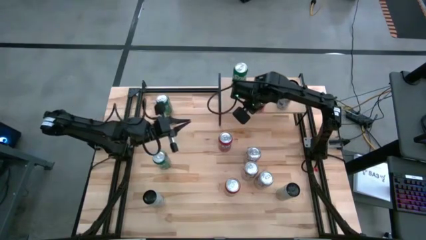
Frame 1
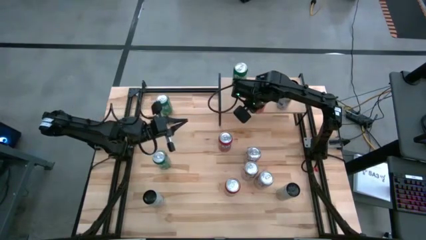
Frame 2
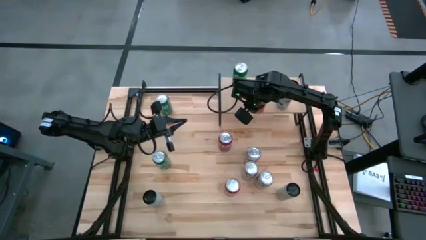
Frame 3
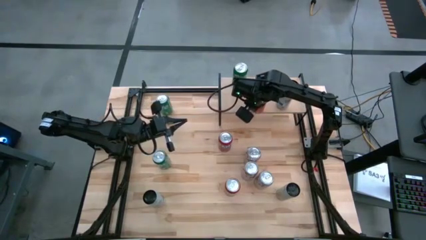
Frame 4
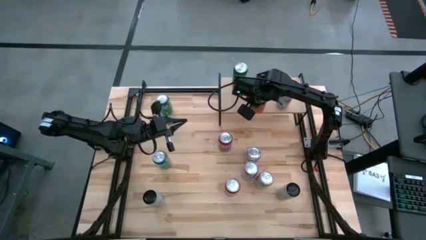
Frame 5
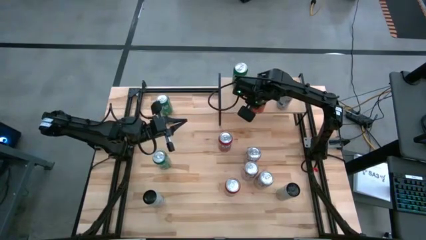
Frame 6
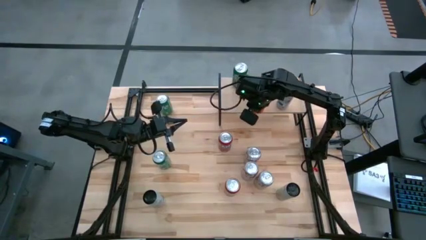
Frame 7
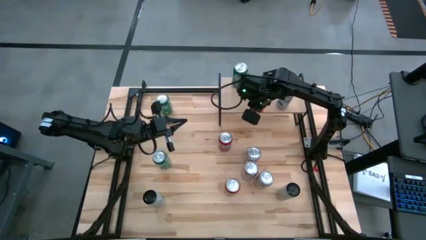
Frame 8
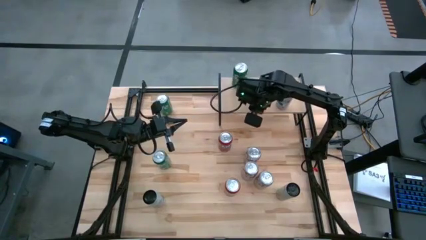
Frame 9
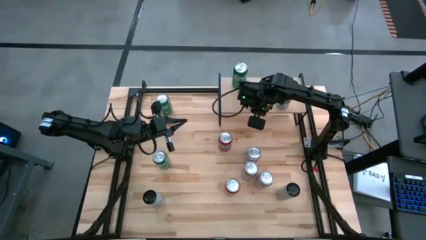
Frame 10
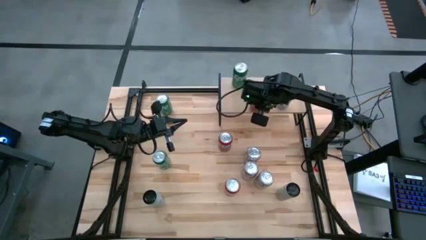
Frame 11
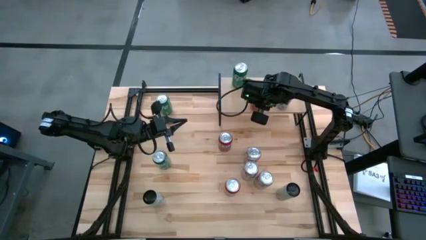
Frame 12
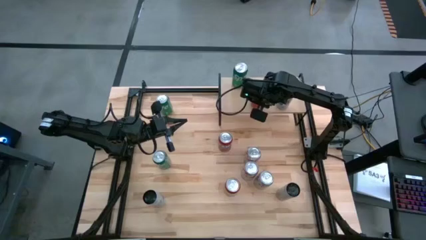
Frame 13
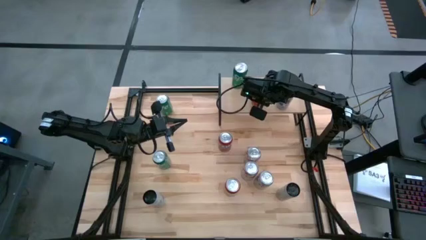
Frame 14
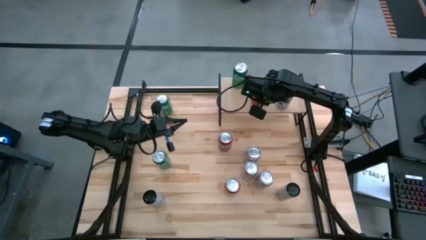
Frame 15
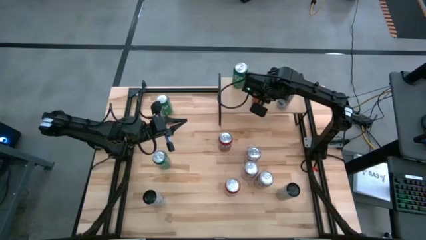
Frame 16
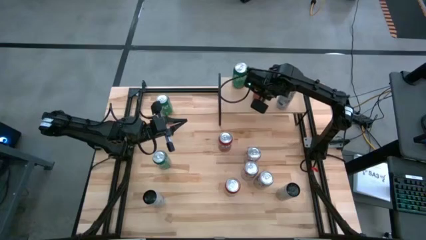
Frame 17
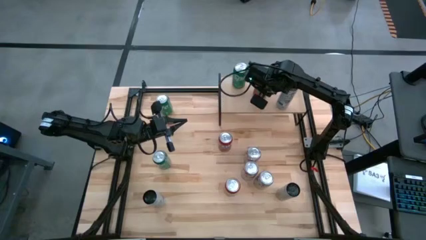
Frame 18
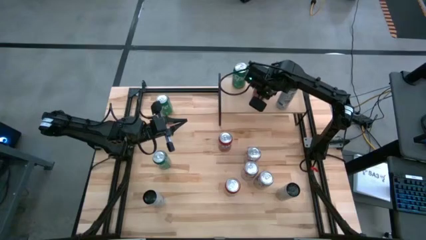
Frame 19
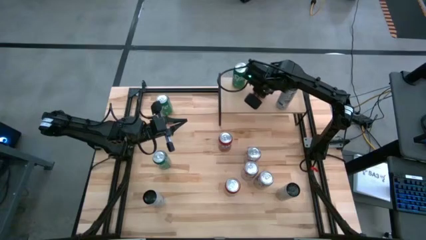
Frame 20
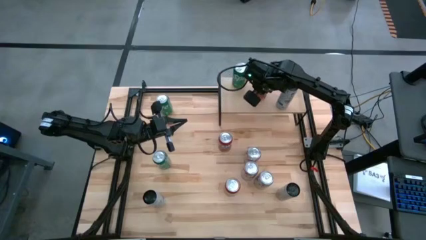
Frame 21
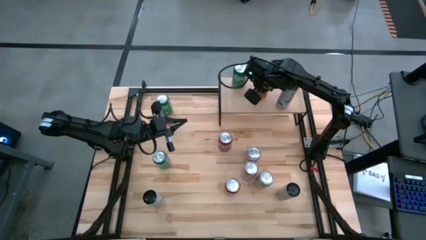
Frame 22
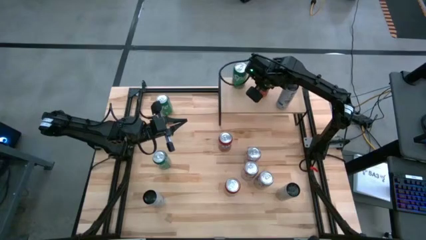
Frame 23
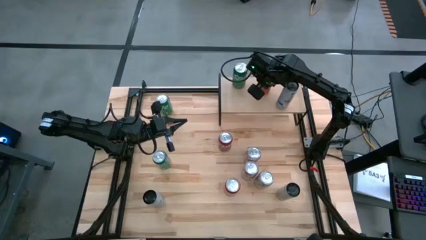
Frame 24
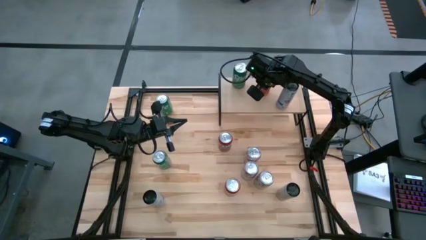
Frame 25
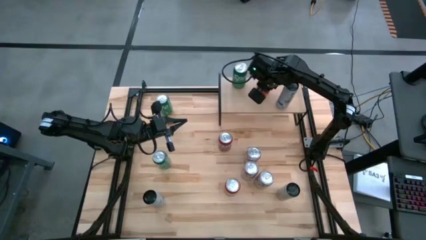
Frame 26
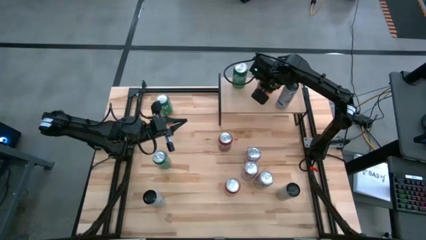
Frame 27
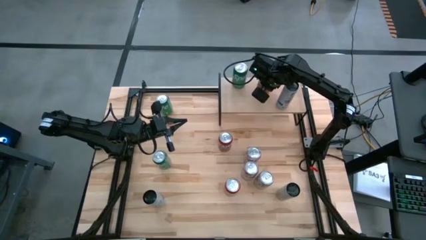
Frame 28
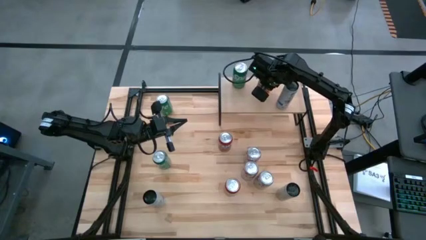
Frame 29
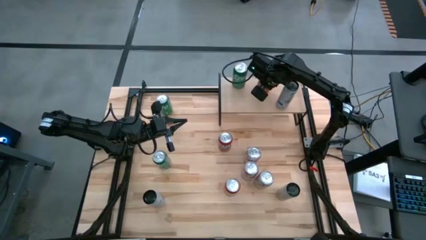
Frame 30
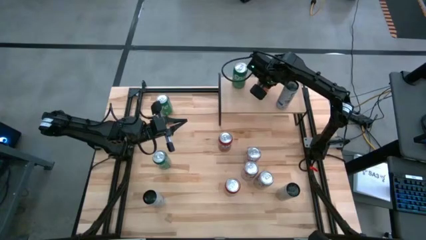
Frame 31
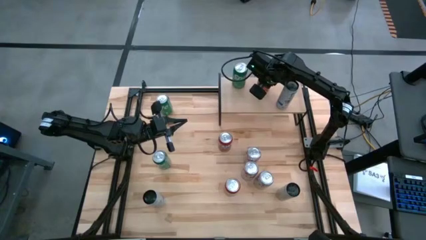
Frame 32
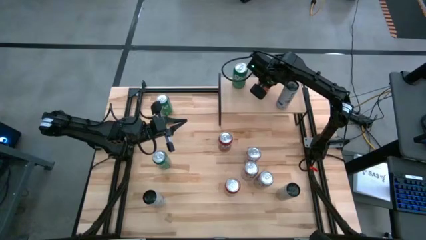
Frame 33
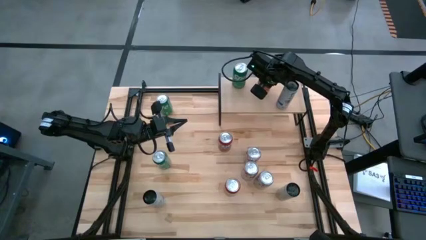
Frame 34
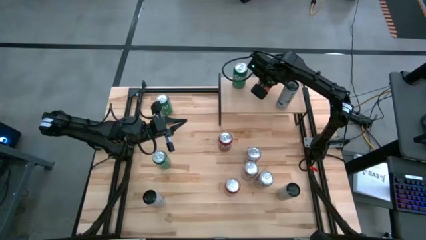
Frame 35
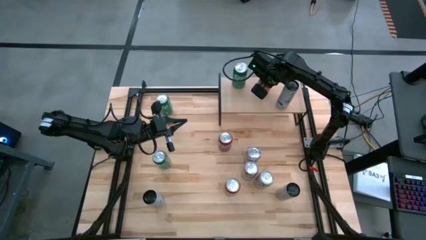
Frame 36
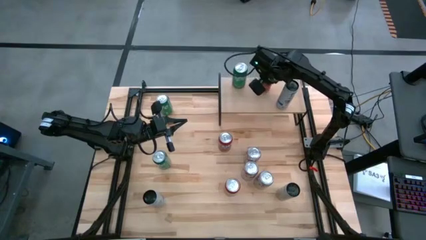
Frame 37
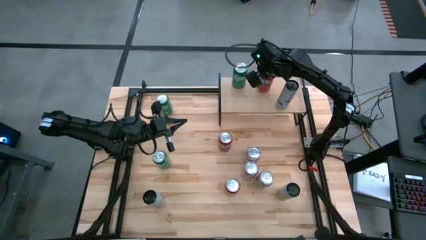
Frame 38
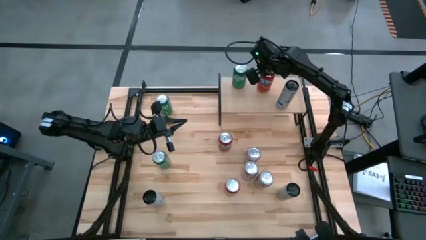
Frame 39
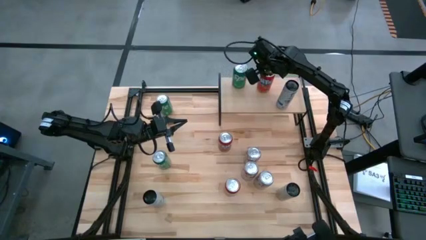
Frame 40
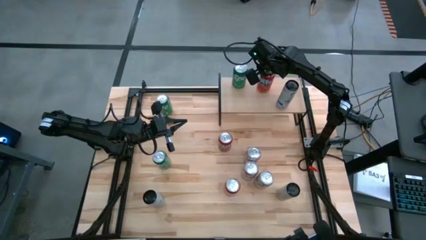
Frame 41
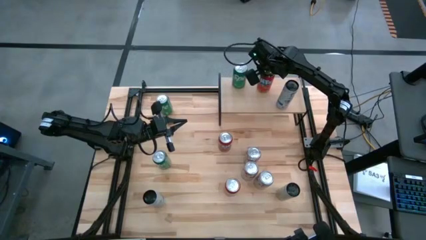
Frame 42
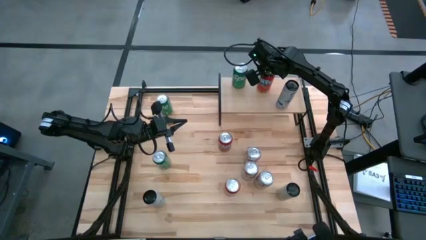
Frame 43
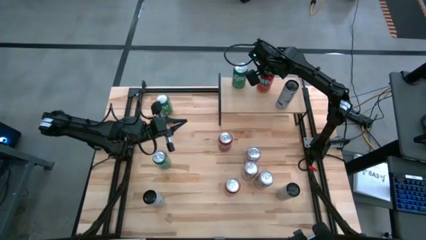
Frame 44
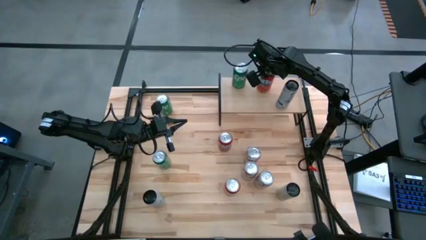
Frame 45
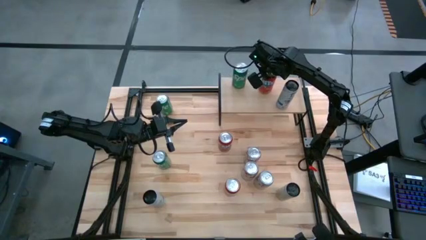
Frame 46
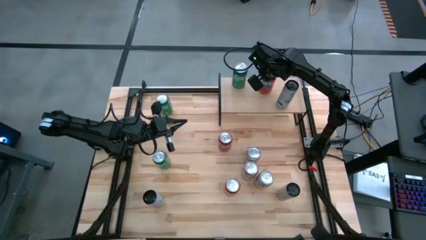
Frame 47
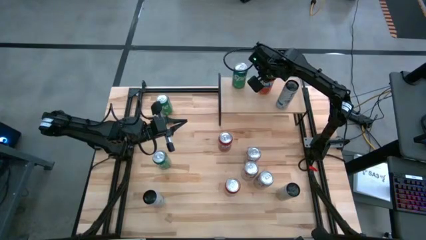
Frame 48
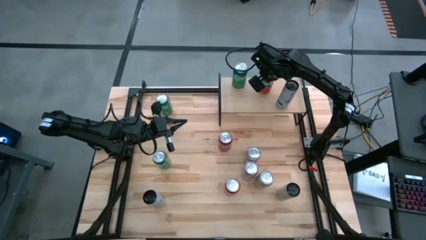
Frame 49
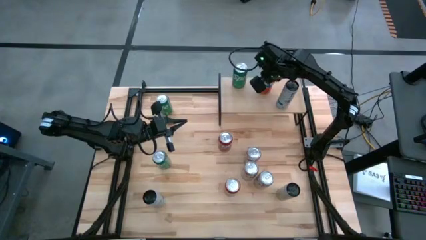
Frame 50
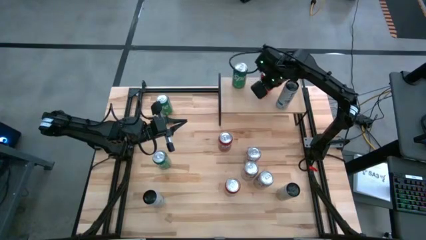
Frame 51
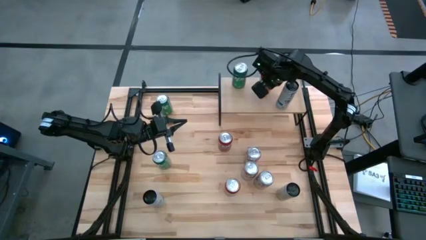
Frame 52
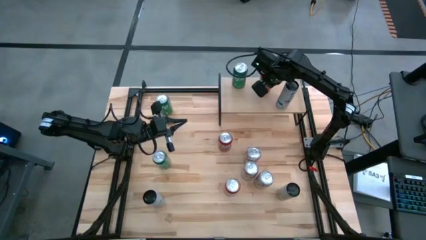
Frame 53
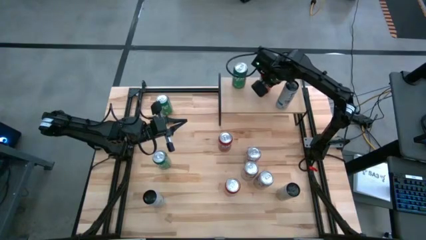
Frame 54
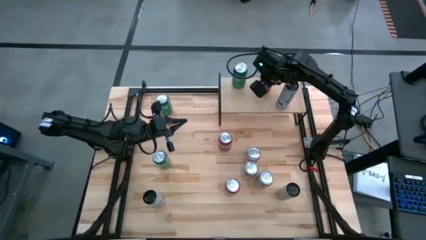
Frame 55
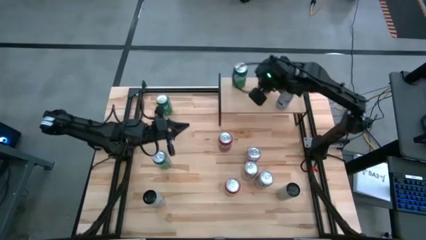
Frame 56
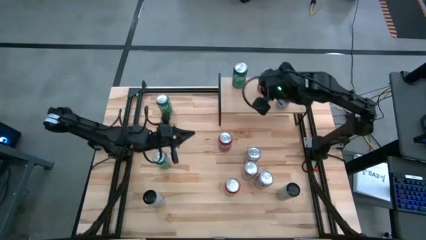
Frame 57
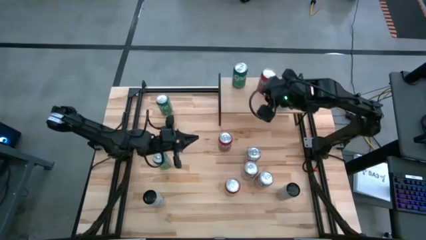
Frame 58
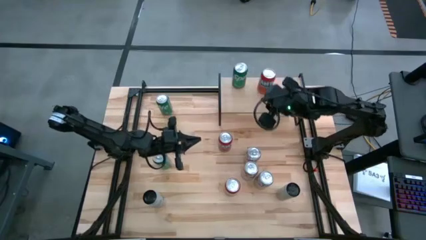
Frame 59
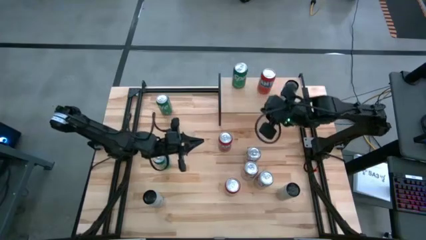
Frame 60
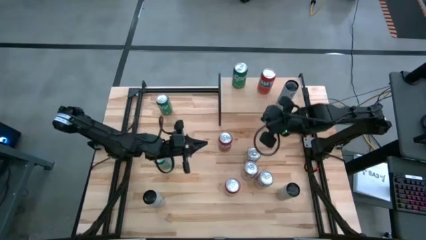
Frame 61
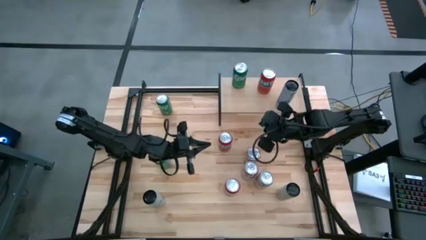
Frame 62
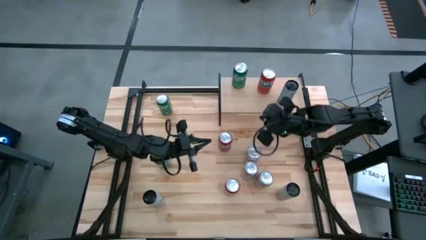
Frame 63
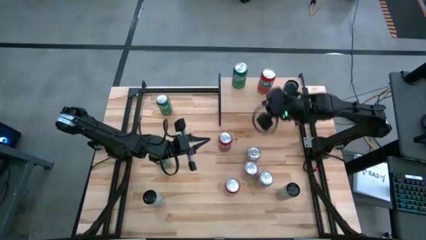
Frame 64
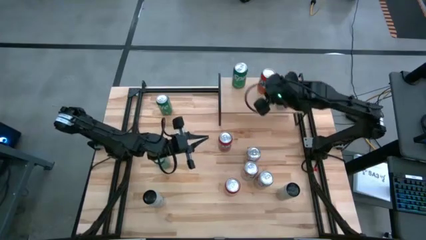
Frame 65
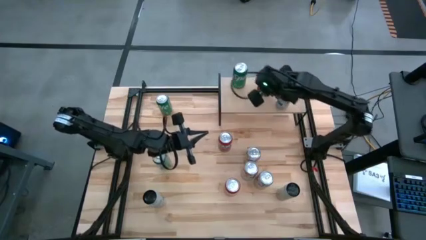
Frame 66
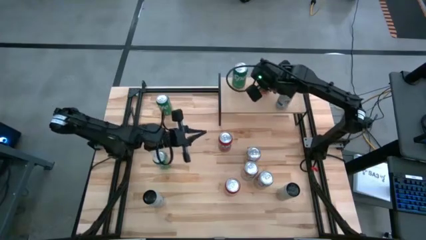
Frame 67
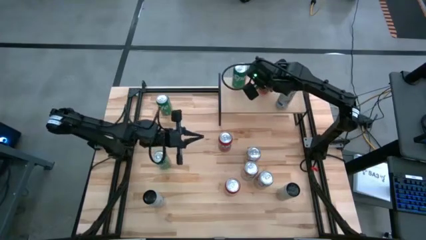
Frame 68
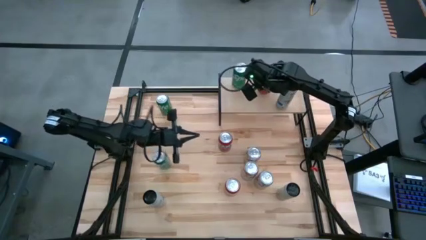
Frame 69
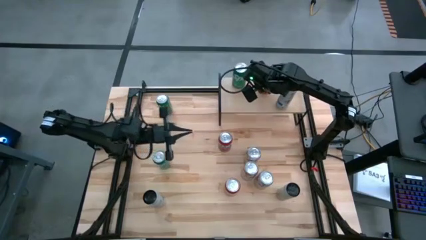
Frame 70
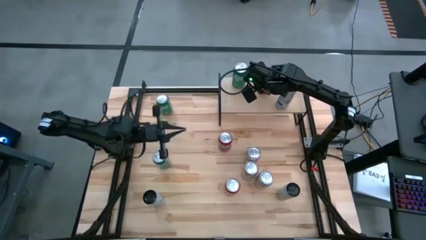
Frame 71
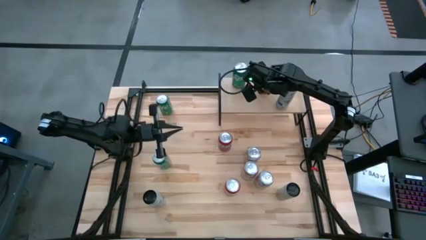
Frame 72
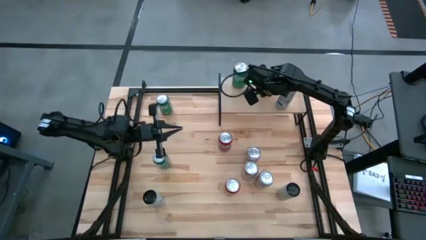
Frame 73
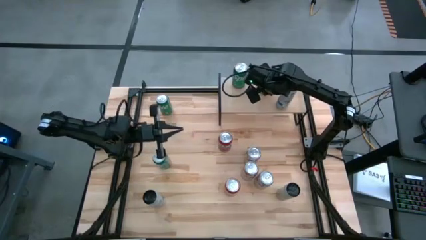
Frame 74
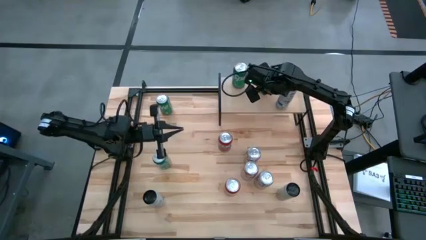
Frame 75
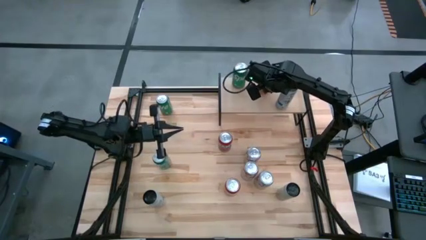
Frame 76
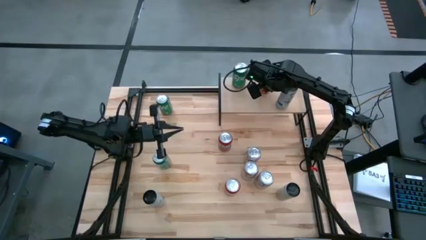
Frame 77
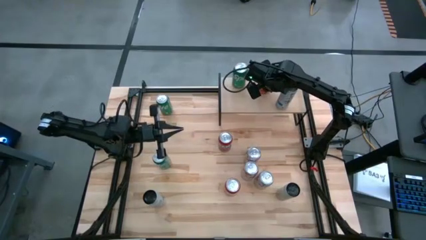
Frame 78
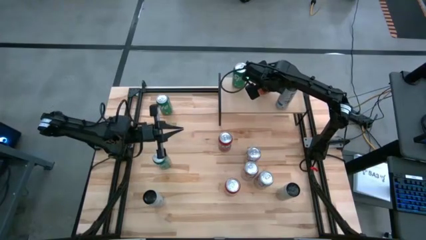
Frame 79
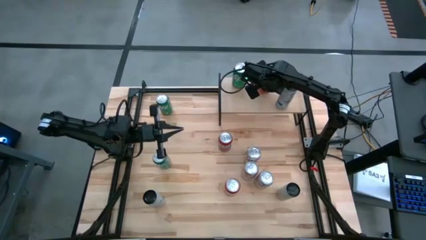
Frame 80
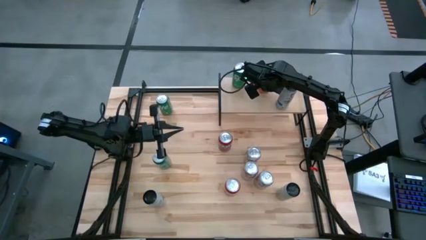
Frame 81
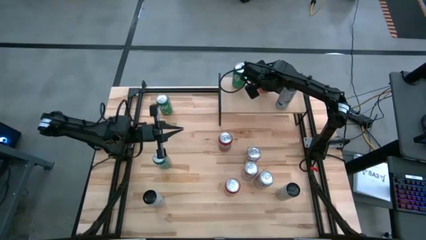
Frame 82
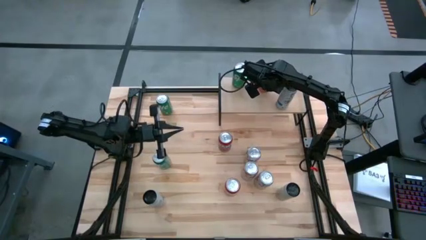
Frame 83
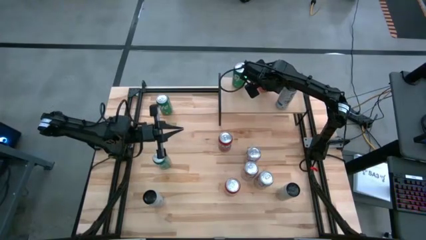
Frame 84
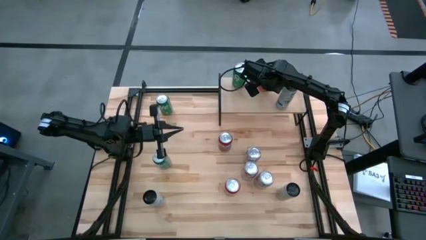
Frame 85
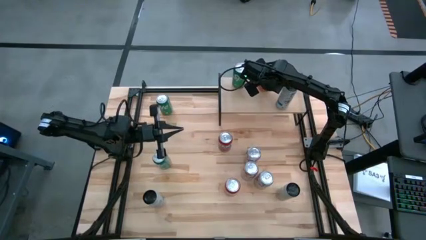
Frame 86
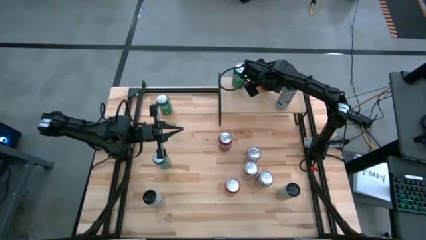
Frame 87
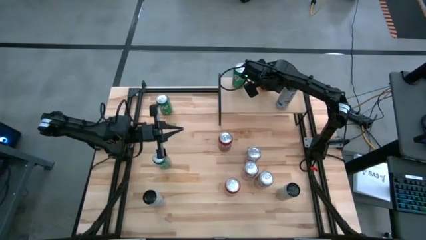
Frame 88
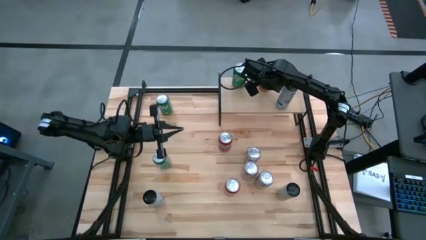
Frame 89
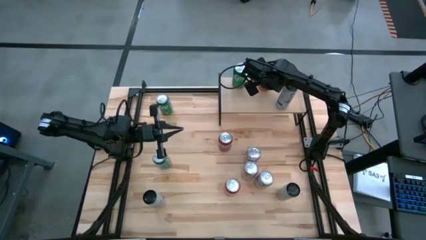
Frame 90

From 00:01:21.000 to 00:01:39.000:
Task: Place canned beverage on shelf
Put the top left orange soda can on the shelf
